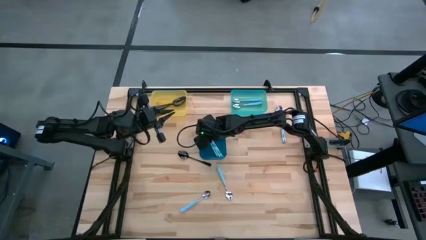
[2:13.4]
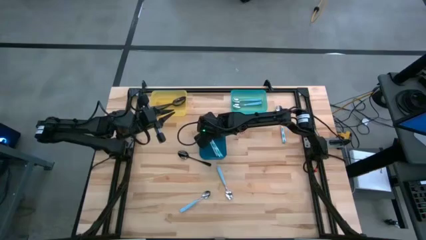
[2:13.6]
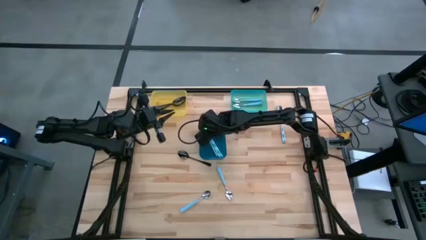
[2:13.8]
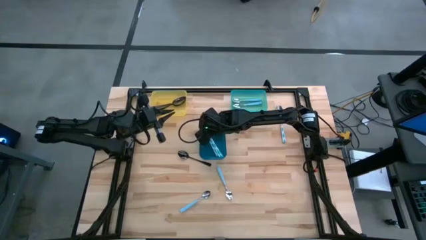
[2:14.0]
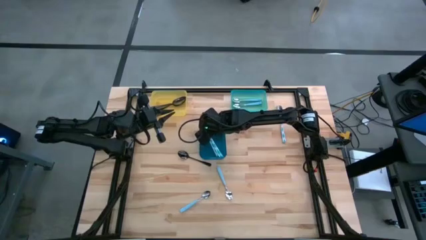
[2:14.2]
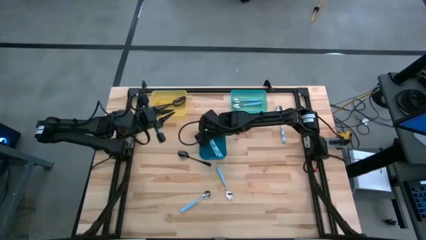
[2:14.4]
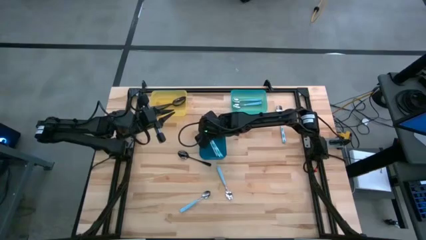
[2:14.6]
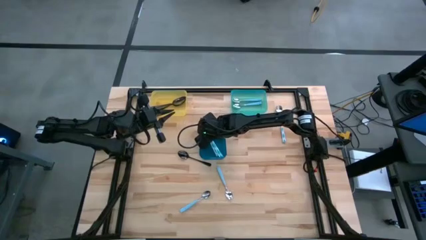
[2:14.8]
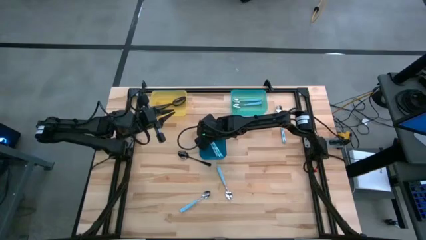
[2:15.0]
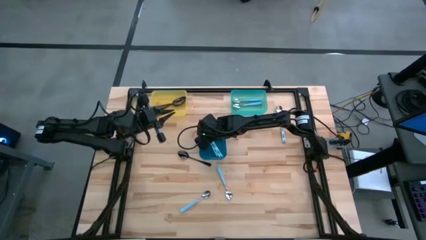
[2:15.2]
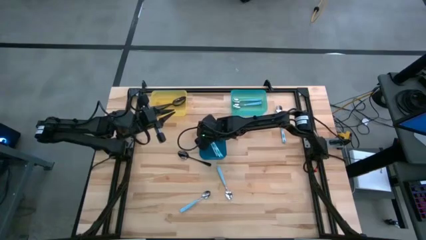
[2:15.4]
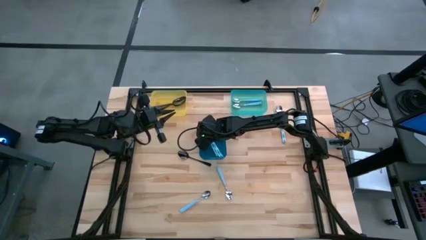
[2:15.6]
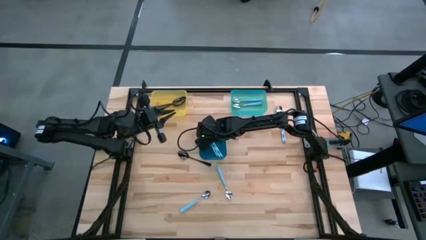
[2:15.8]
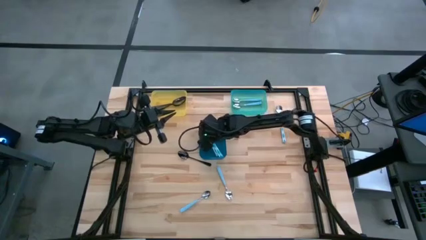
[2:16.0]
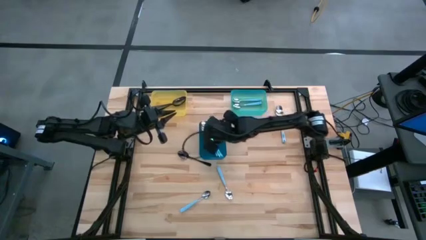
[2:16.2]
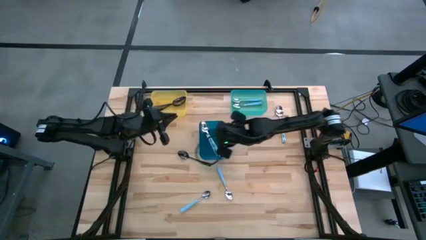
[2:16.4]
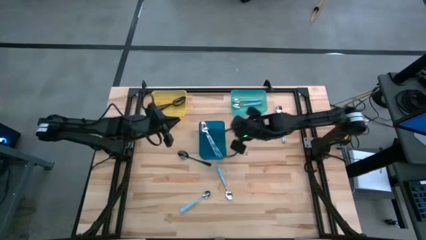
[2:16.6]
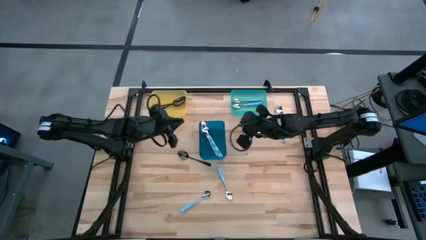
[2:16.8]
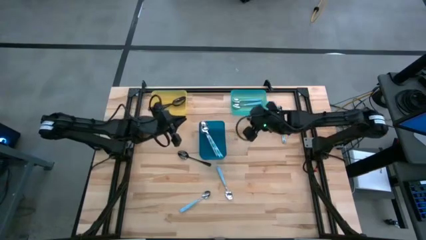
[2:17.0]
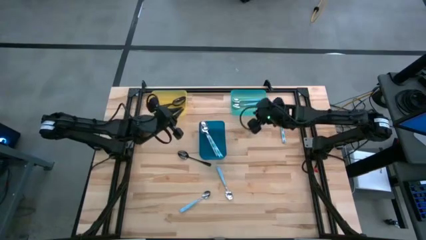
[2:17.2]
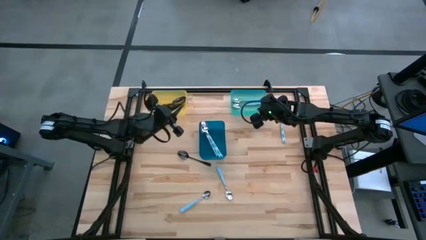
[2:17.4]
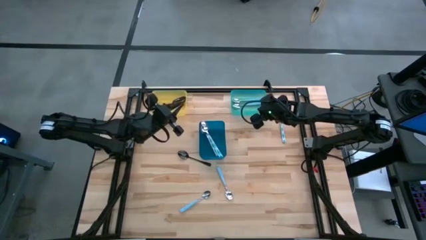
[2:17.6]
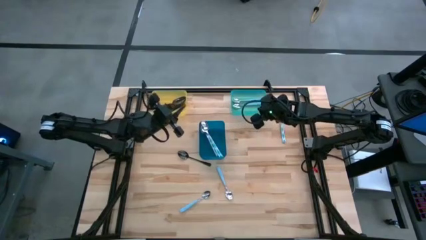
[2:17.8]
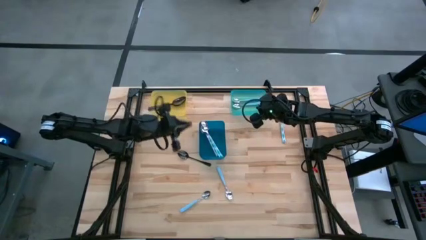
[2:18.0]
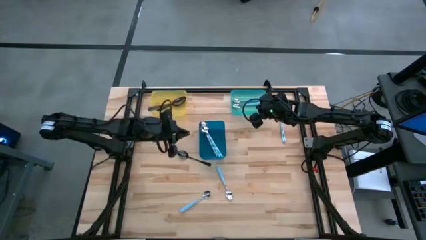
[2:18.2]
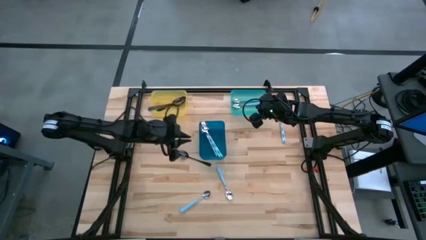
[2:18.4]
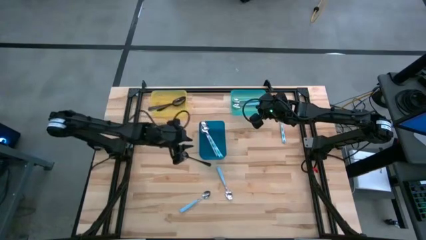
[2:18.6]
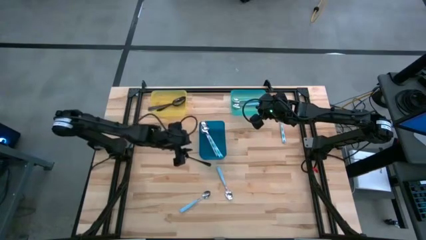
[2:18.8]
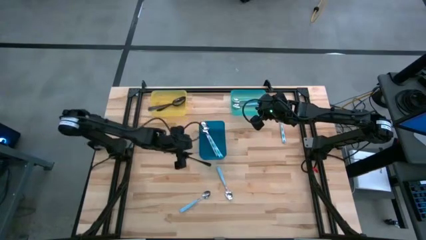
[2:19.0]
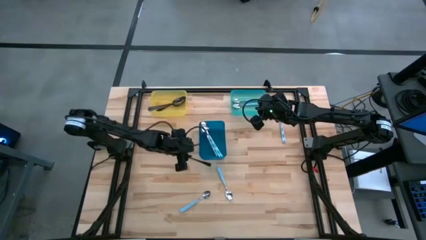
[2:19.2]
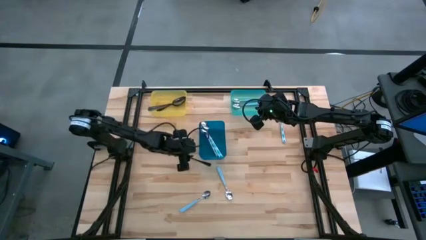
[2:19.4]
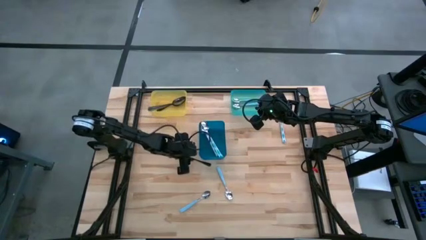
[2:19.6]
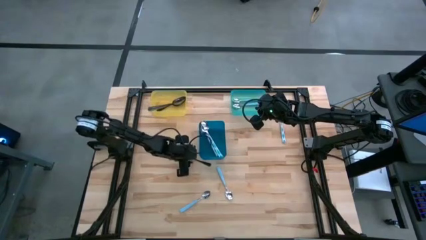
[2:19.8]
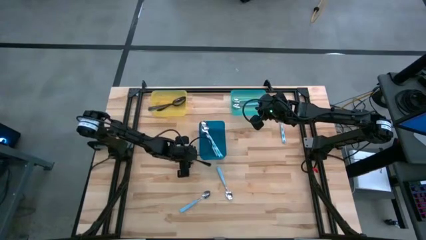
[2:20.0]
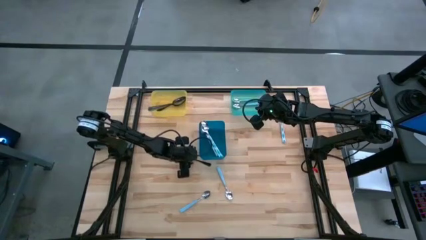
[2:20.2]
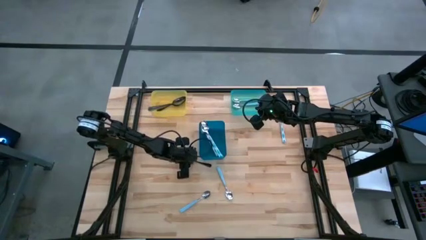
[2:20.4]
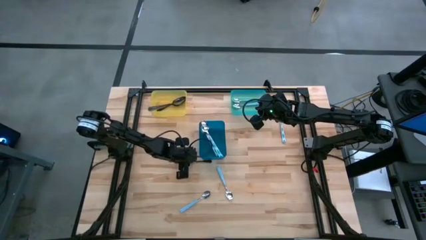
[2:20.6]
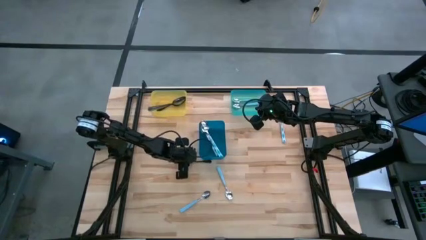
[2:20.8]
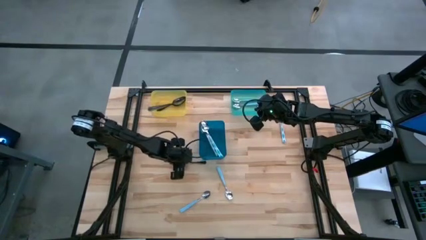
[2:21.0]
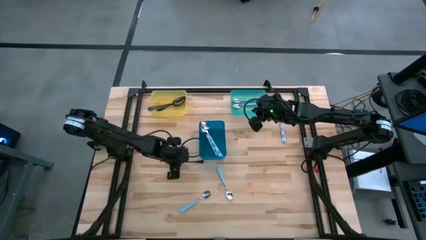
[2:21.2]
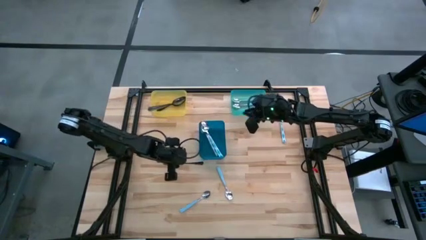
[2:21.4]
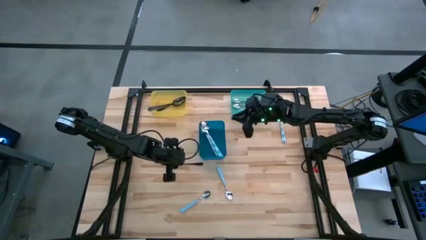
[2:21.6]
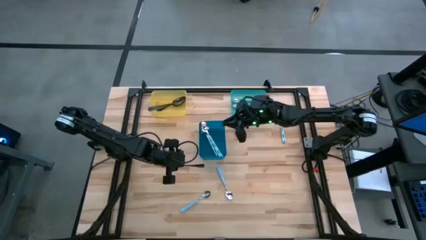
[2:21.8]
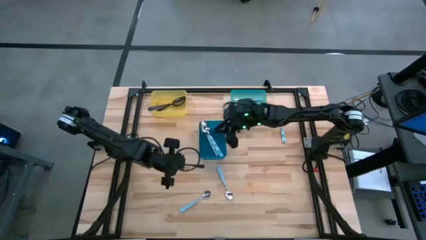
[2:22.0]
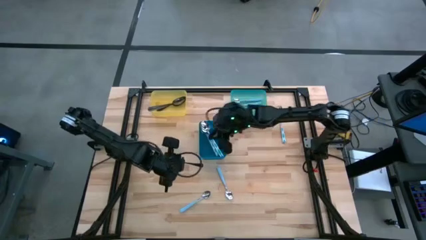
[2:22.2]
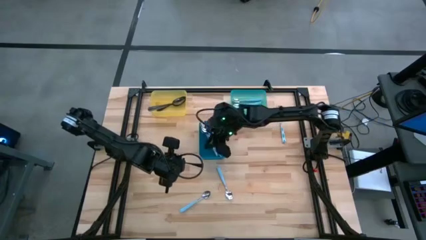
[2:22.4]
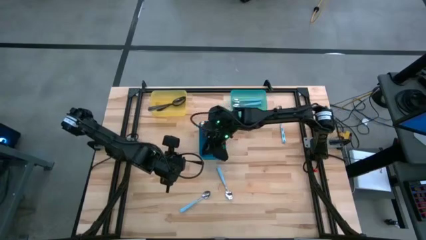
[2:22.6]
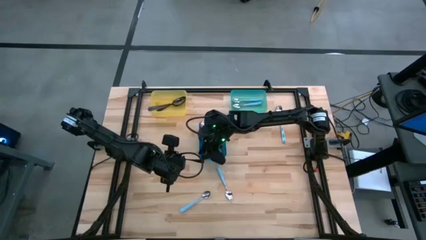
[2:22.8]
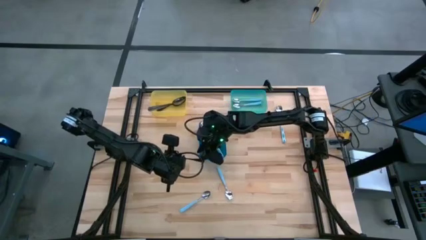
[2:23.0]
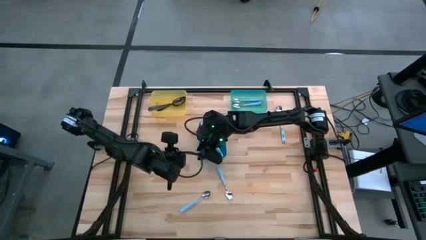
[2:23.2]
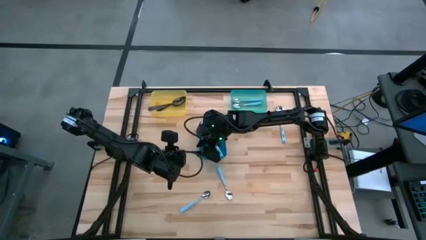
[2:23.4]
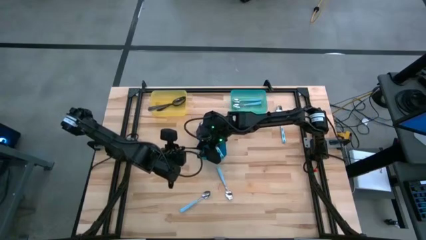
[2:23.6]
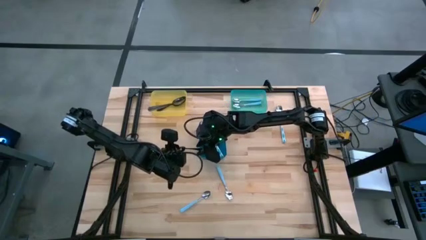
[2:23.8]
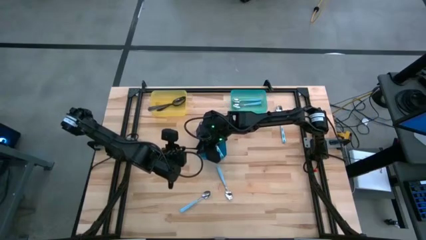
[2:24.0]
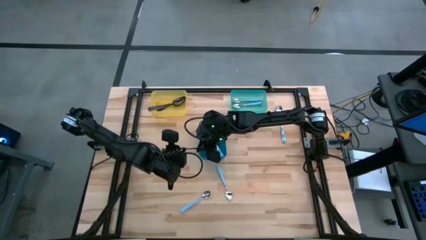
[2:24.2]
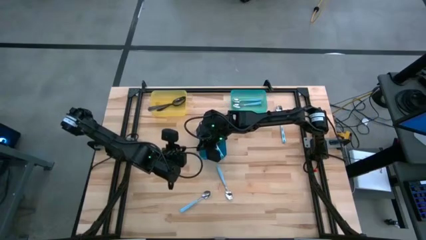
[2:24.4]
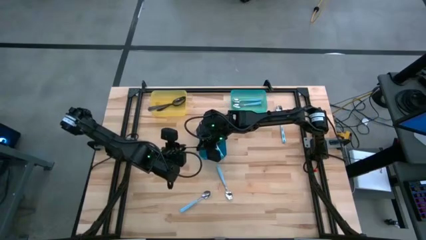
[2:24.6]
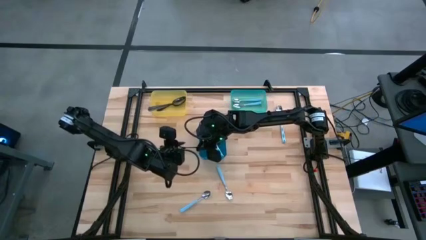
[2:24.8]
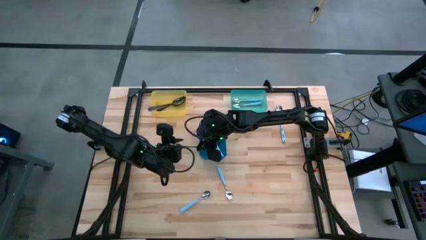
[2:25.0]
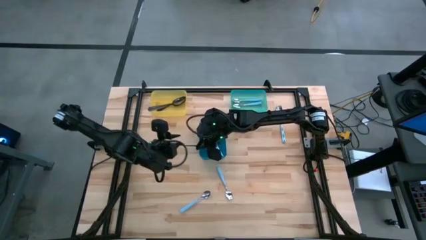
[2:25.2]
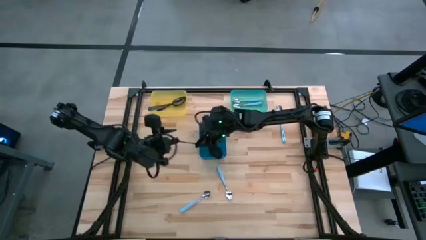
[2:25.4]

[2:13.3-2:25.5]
Task: Sort silverware by color (type)
Put the black spoon into the yellow bin

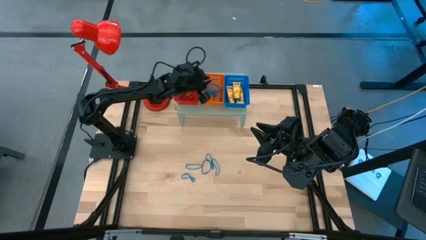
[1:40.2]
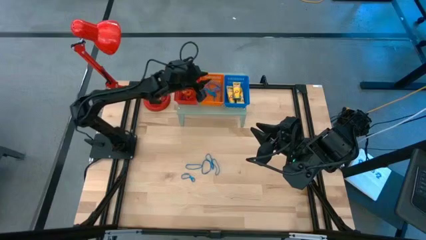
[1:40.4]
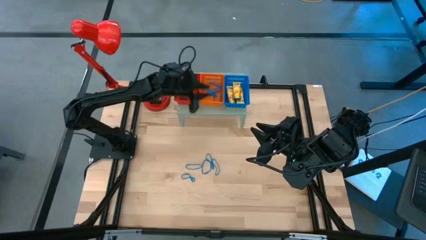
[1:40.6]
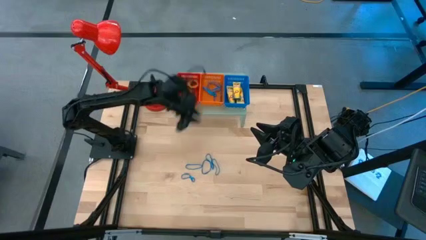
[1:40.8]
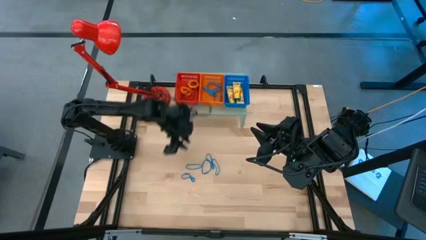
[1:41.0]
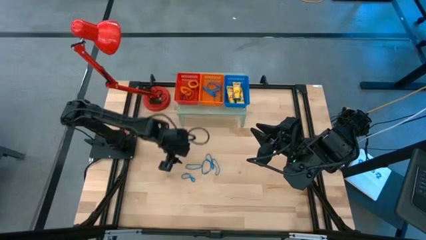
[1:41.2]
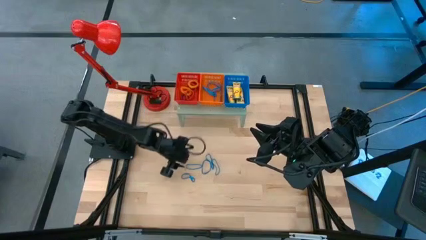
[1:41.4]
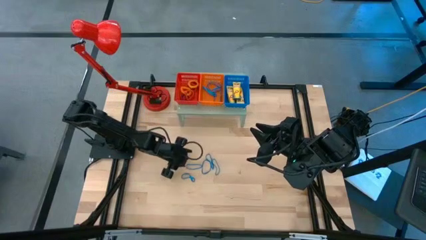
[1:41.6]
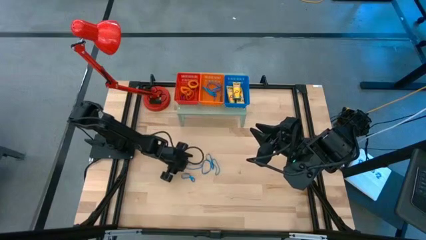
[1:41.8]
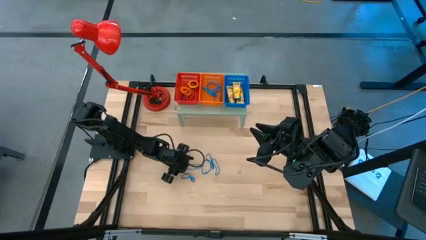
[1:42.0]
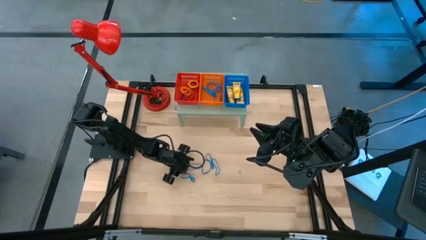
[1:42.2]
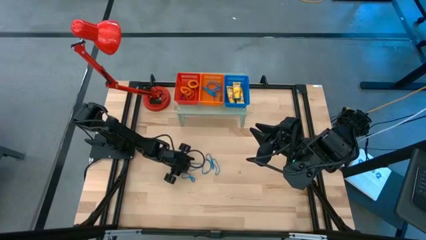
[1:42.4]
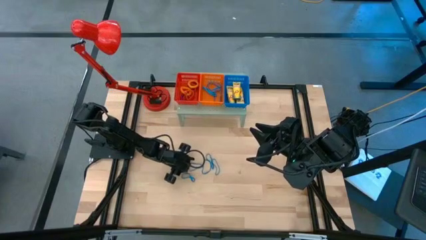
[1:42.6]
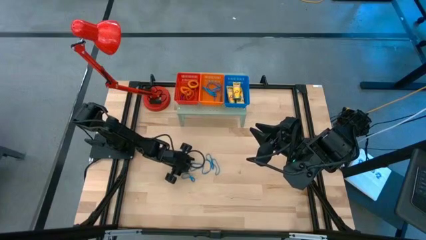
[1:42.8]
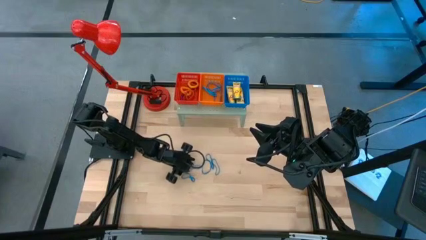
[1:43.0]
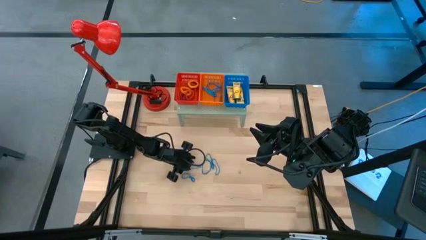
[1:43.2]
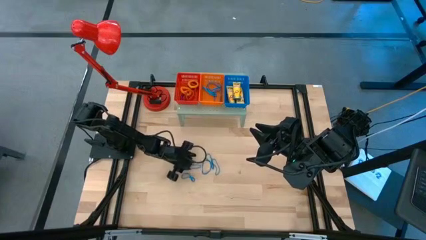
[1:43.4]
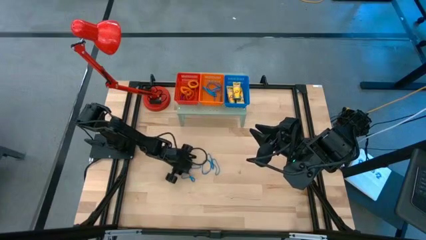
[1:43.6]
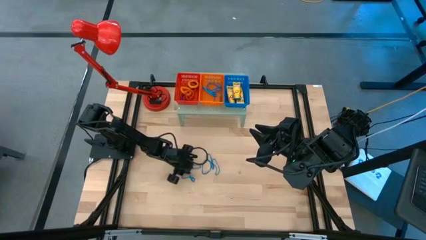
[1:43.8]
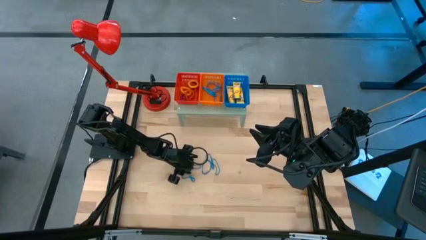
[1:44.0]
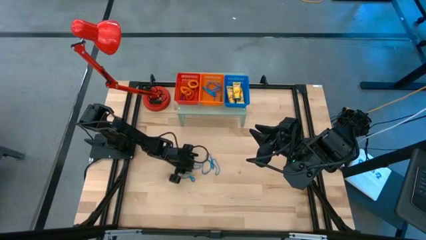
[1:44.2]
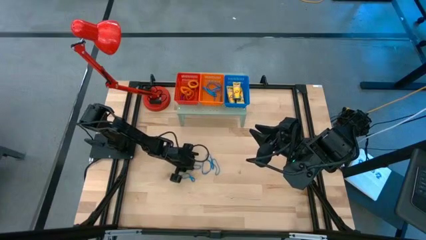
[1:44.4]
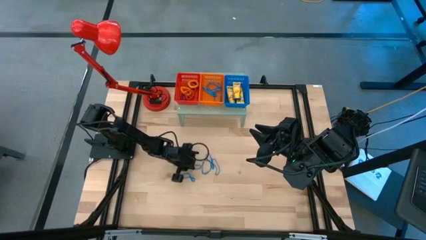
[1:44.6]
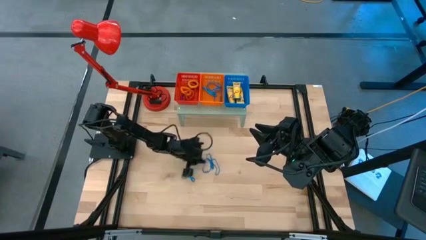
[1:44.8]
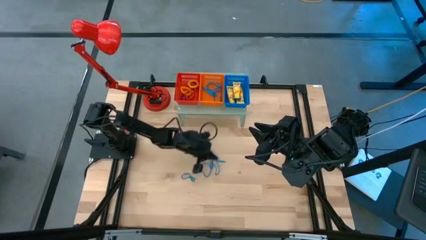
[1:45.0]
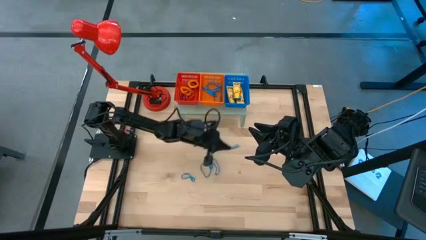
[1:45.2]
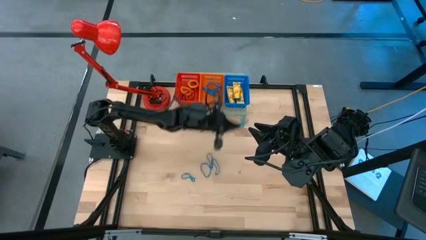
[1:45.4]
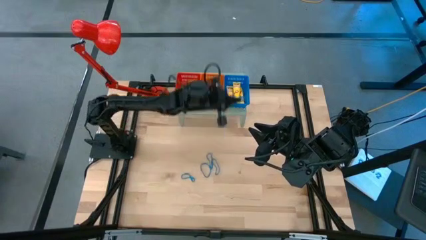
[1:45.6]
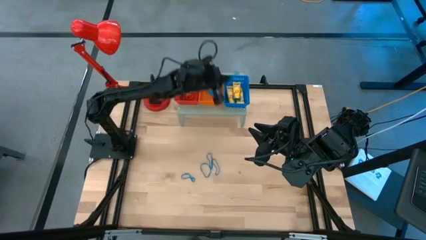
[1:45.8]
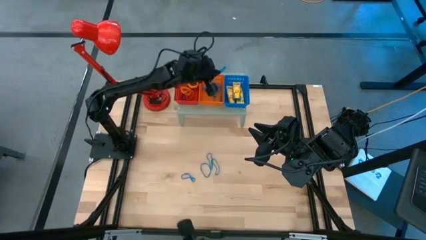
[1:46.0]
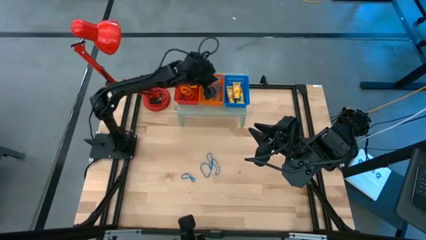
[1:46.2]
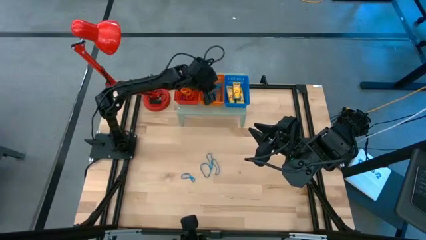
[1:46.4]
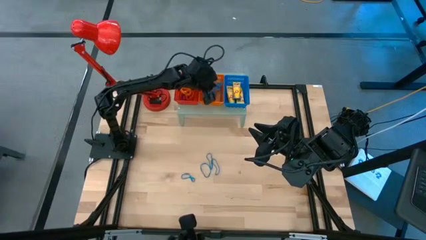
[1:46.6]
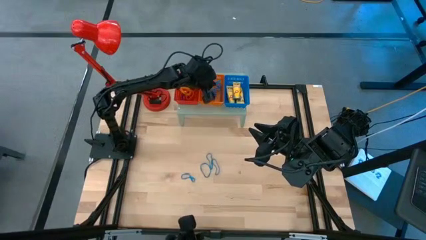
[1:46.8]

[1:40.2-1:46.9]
Task: Pick & Place Office Desk Supplies
Put the blue rubber band into the orange bin on the shelf
